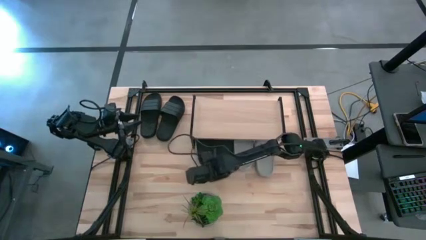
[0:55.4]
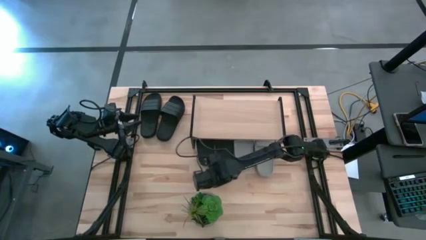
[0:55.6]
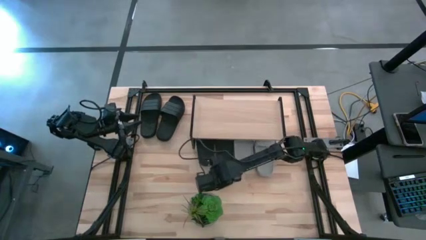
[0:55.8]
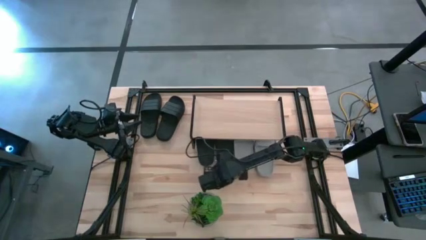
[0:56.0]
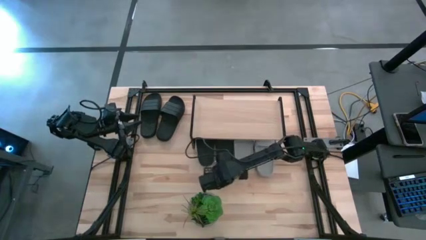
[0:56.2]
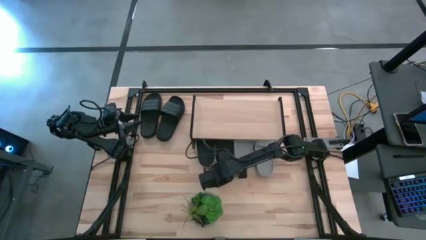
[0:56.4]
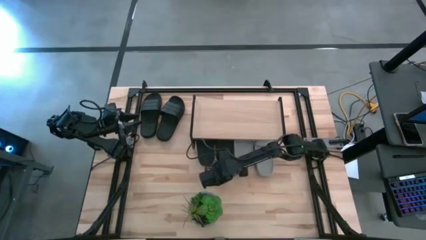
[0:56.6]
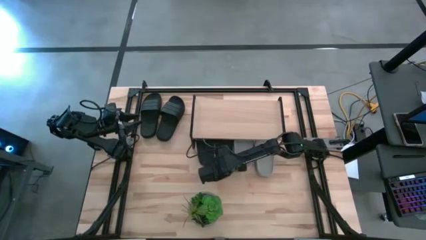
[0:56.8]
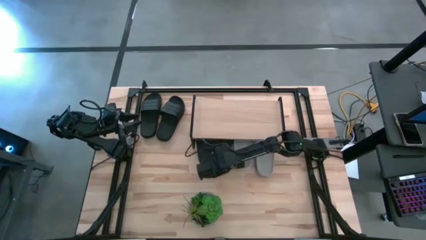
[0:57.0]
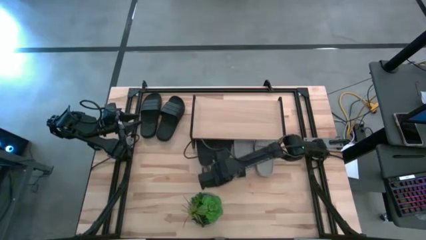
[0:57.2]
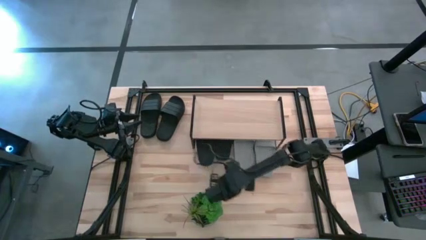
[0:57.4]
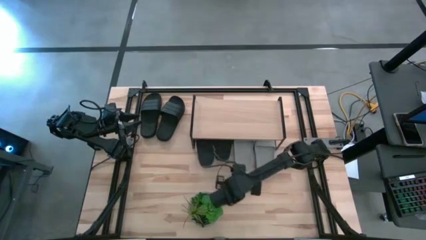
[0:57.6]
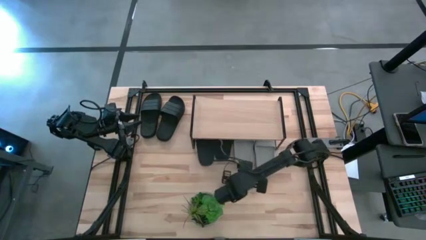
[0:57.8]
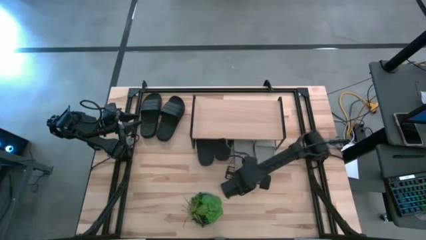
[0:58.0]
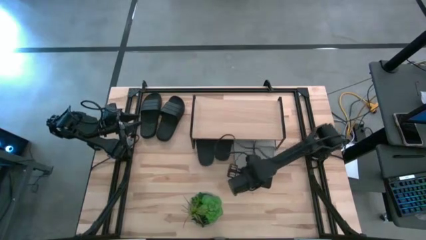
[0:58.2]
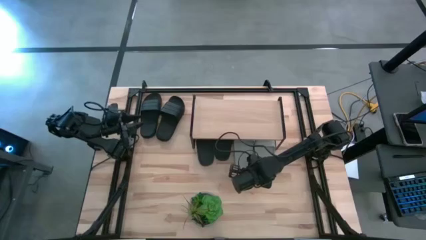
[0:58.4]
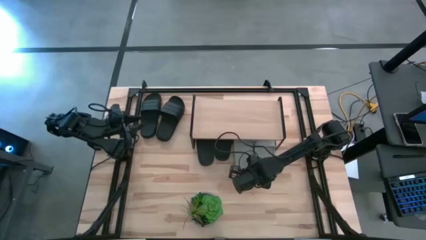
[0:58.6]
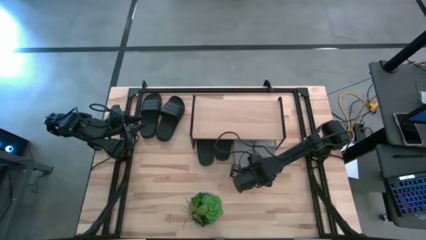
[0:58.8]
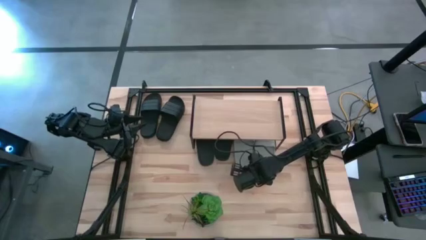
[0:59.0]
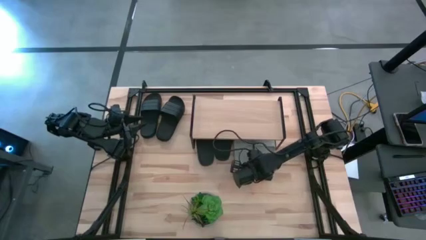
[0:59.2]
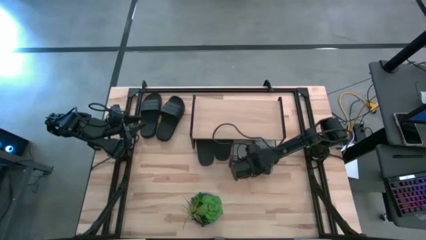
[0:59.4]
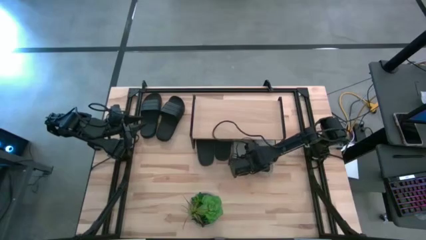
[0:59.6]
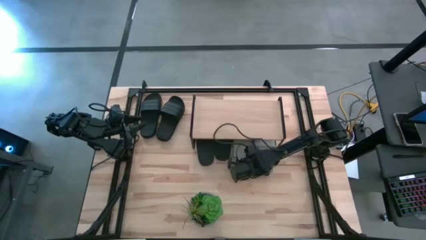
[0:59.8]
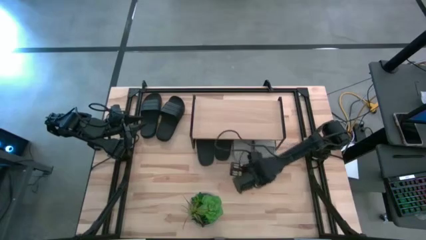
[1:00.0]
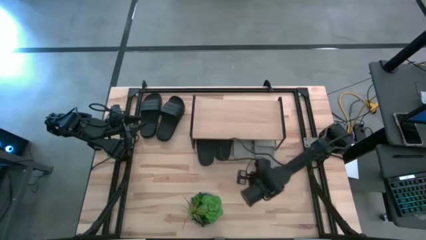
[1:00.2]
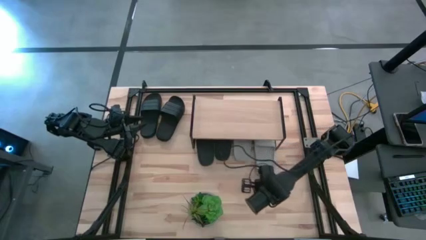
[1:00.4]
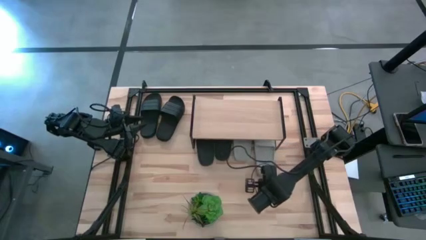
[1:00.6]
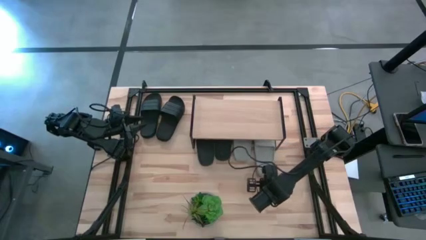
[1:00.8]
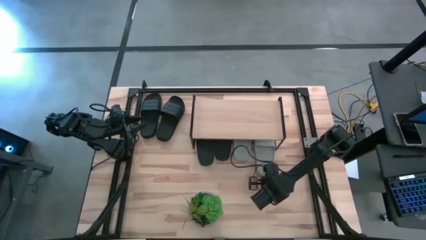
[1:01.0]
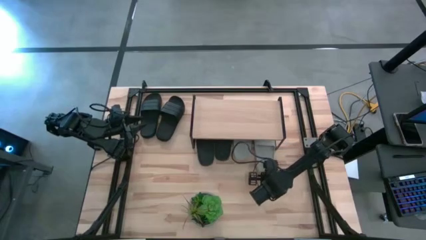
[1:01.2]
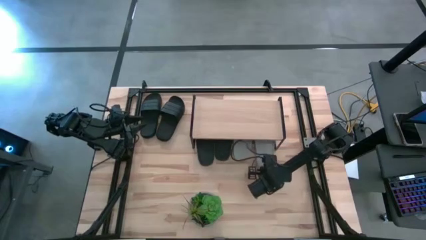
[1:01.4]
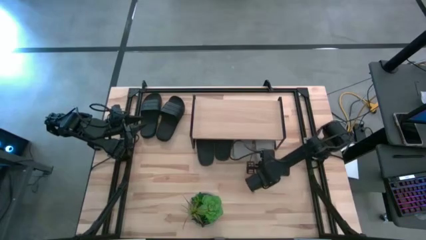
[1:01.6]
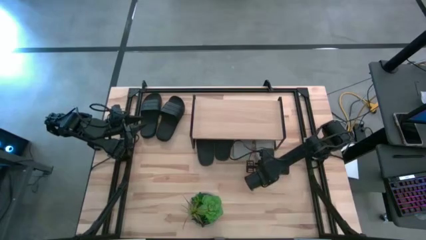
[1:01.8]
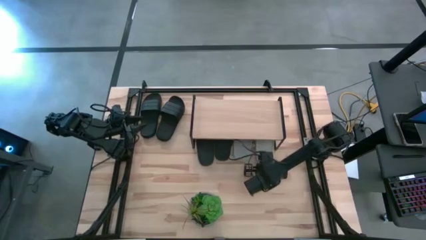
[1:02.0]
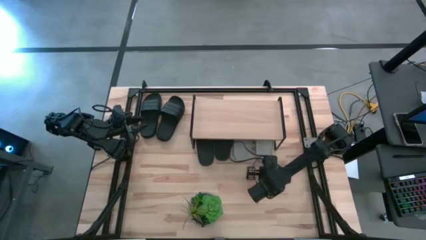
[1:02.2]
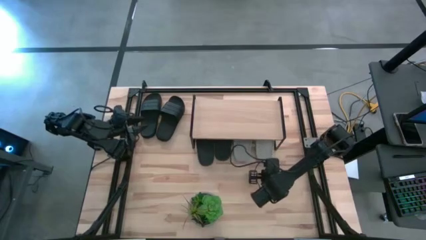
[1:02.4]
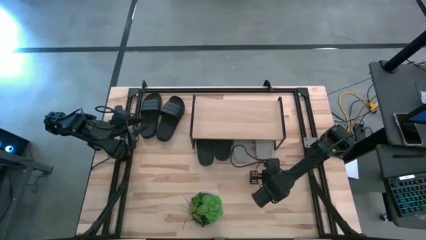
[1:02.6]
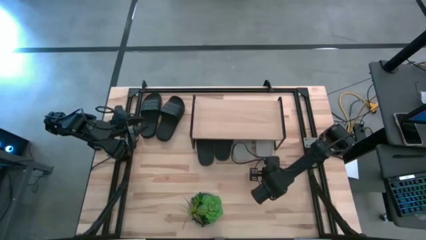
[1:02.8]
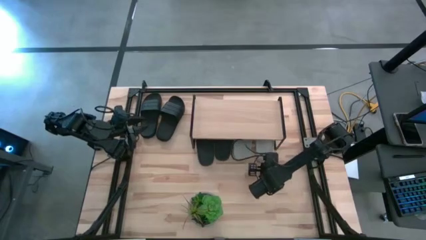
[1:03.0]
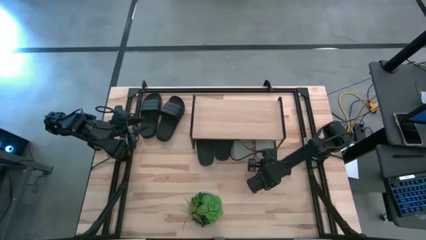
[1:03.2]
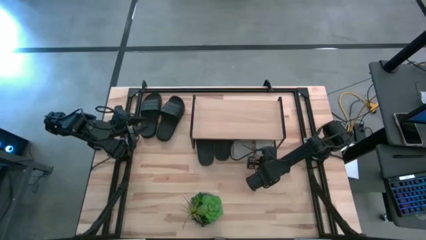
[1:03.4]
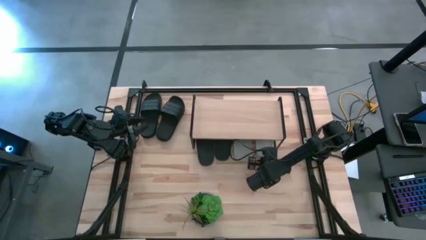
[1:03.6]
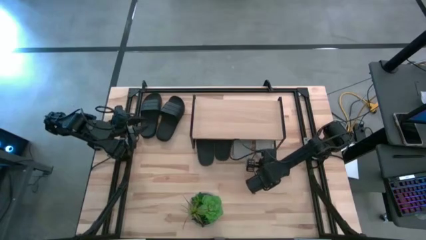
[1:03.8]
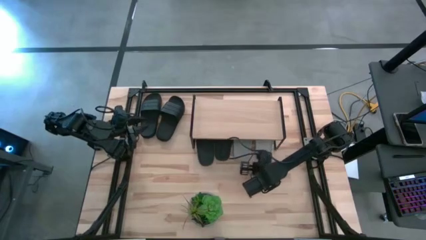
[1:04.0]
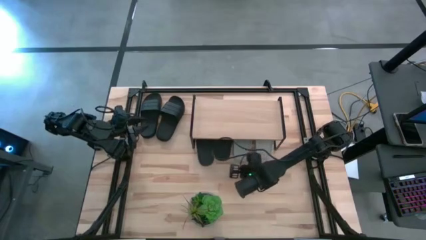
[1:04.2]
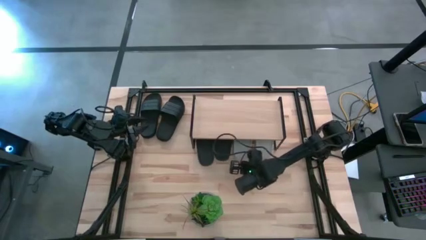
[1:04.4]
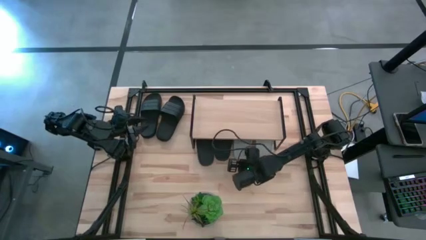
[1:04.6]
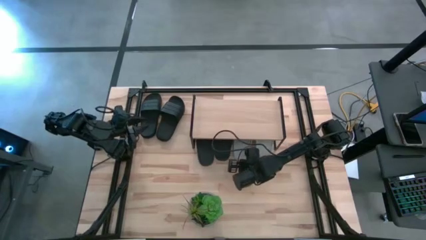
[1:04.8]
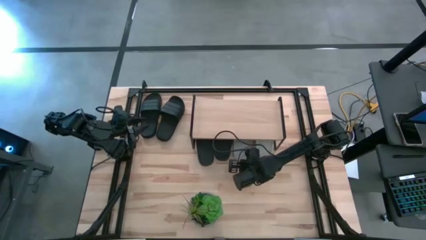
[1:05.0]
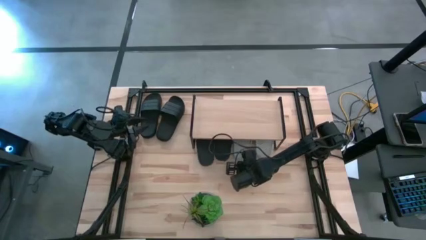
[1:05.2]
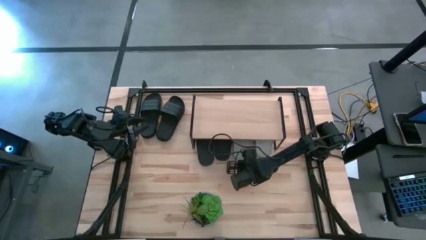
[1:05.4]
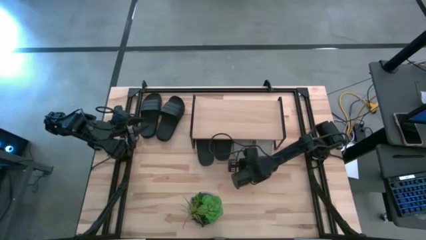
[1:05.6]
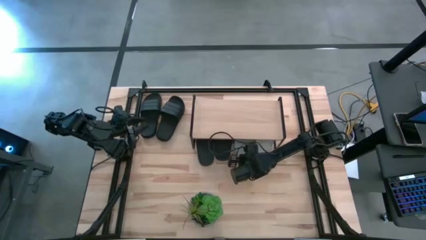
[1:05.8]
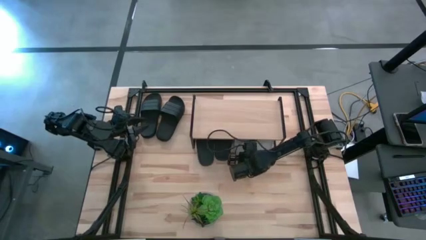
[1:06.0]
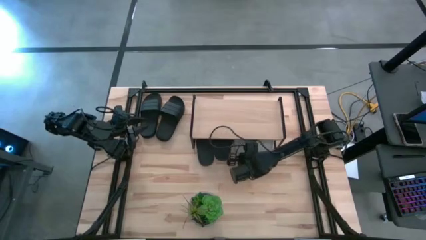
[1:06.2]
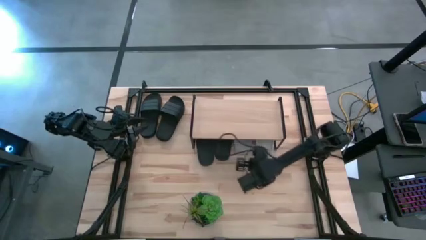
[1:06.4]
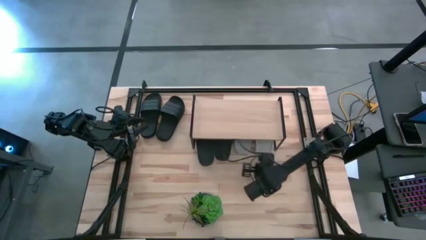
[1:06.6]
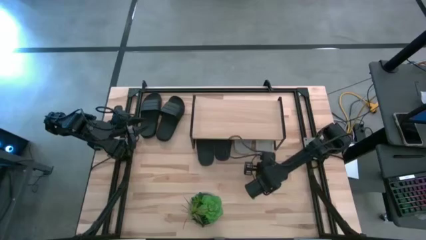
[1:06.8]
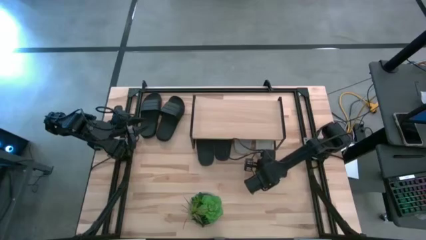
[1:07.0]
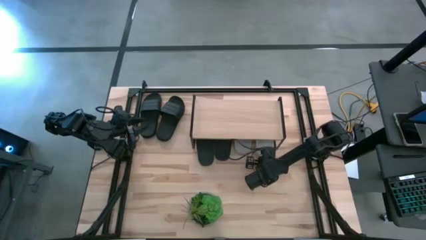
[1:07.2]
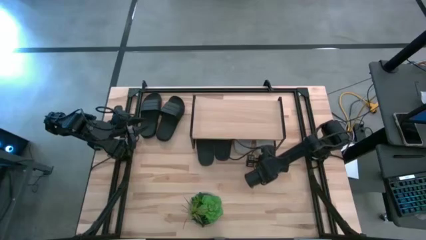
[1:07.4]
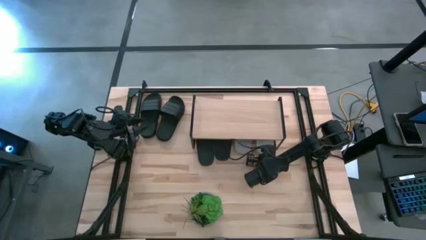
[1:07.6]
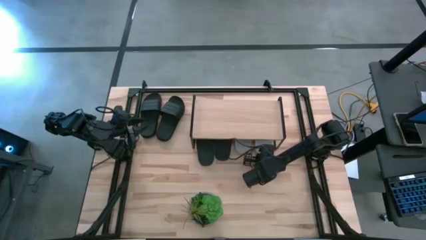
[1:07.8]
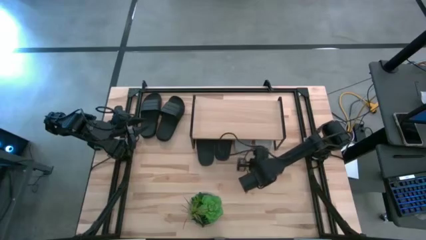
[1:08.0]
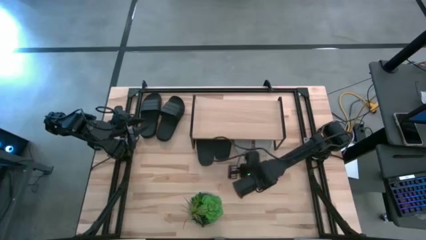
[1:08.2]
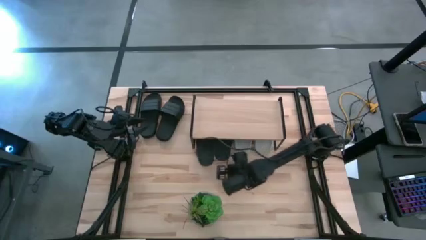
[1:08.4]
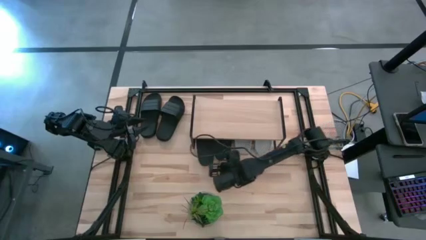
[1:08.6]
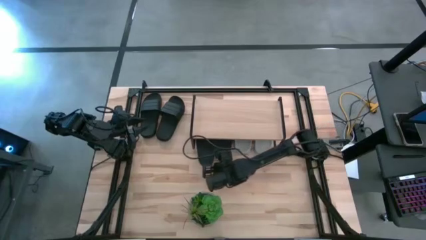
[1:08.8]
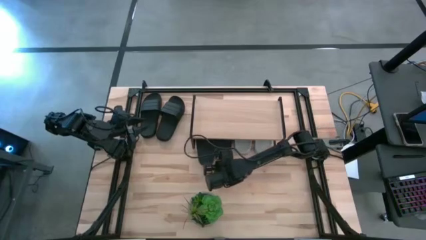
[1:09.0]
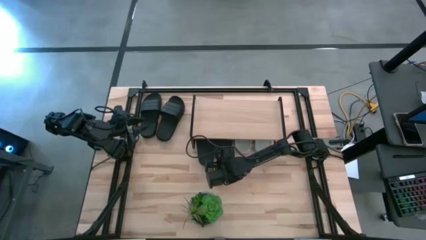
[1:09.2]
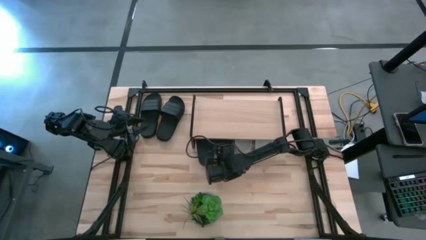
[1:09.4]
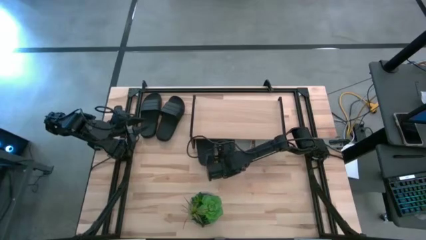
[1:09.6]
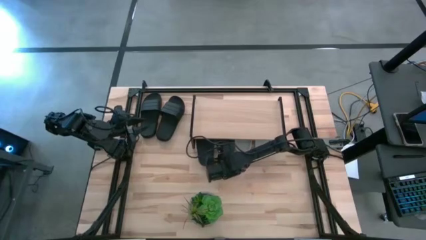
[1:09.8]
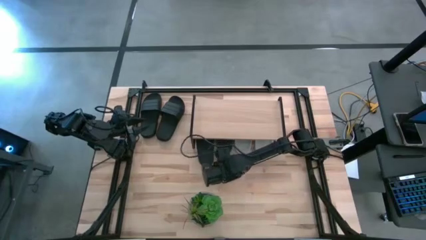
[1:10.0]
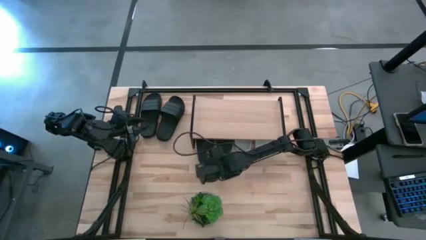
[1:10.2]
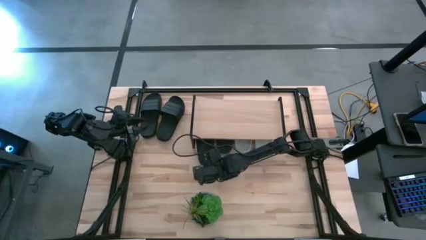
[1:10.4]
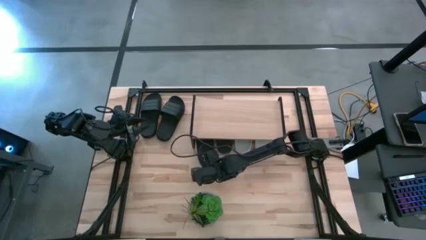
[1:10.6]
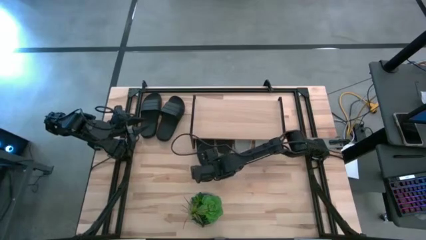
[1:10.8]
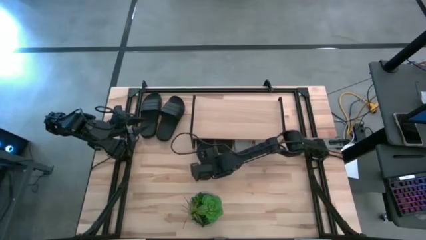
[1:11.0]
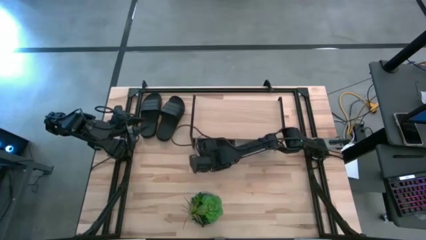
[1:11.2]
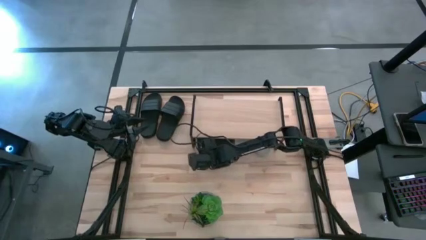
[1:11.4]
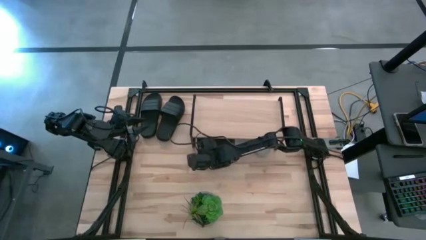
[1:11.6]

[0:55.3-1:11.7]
Task: Pick and place slides into the shelf
Adjust the black and gray slides under the shelf
